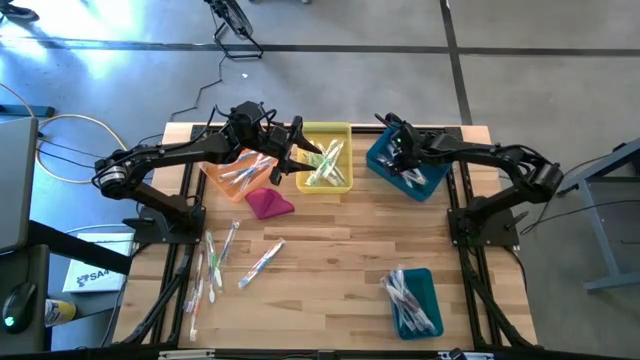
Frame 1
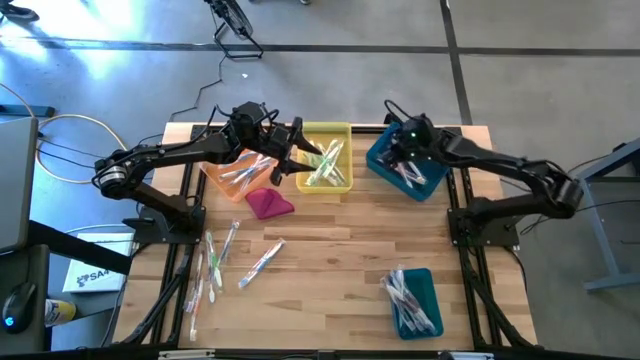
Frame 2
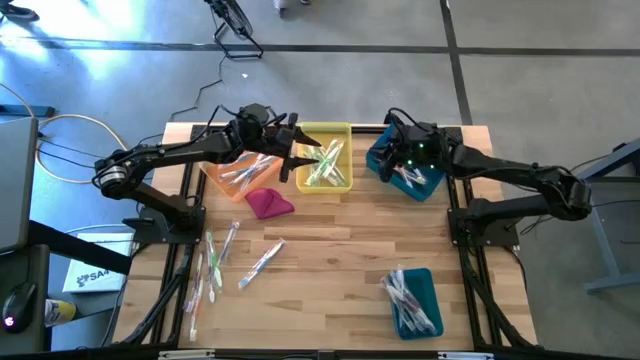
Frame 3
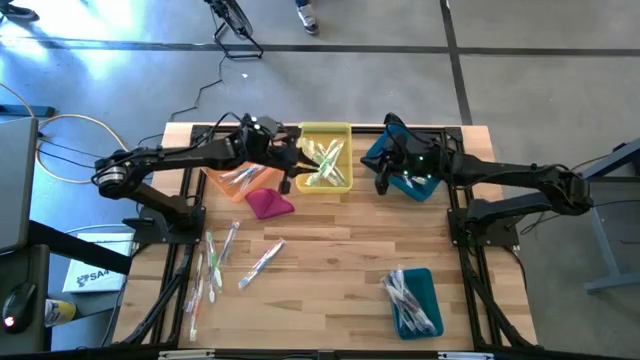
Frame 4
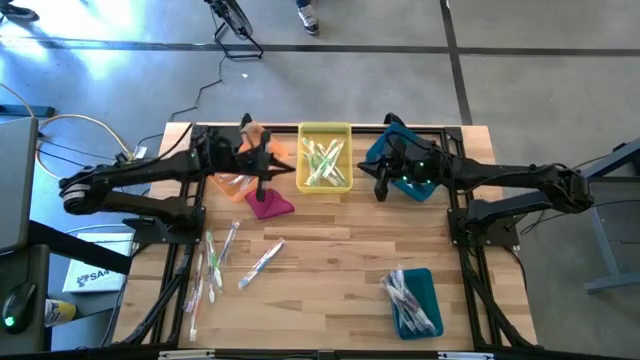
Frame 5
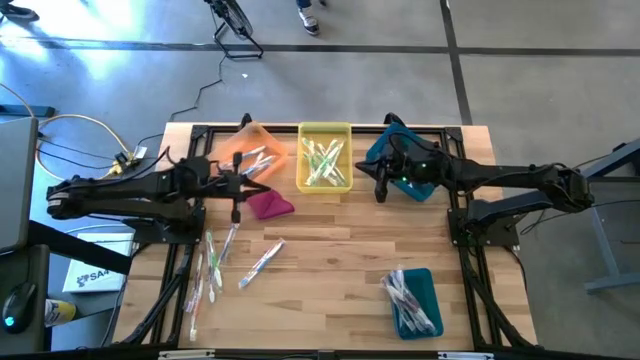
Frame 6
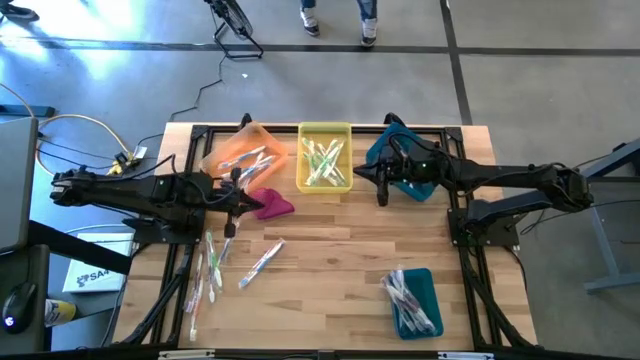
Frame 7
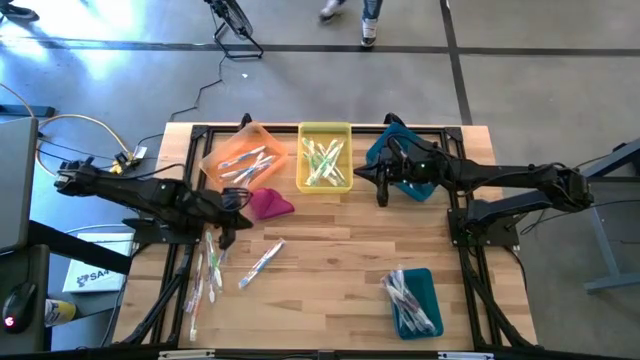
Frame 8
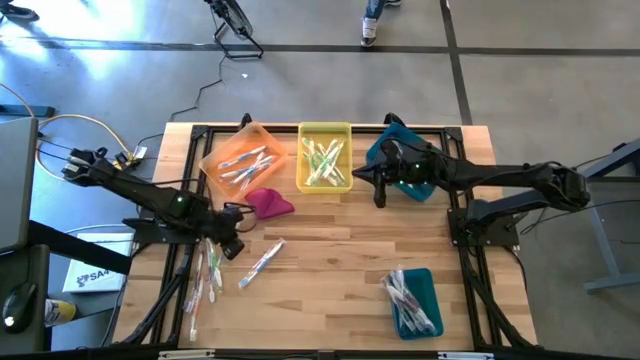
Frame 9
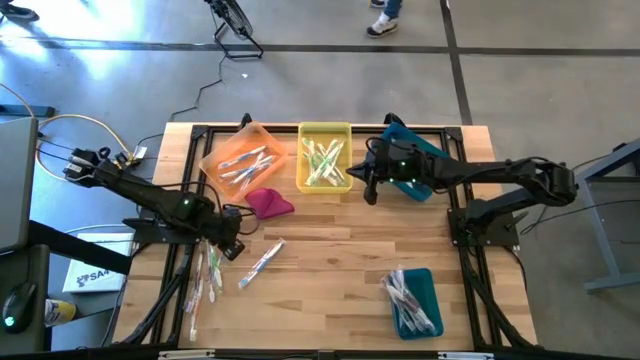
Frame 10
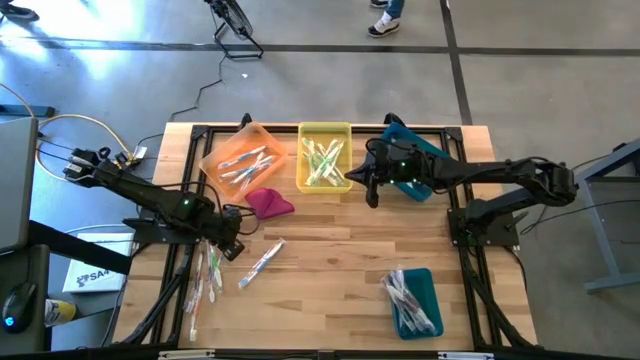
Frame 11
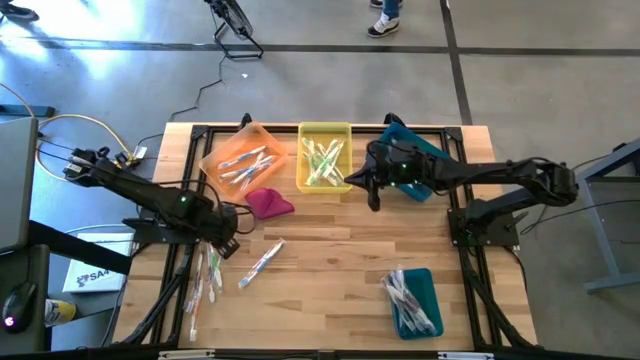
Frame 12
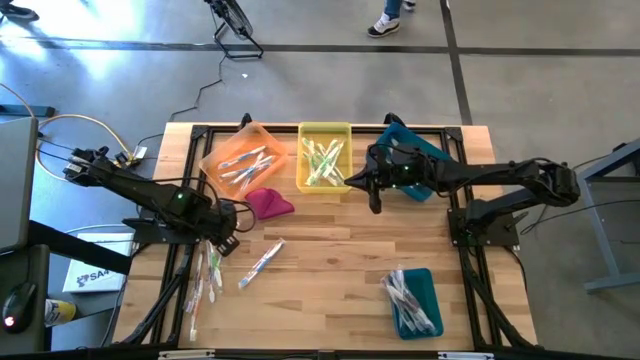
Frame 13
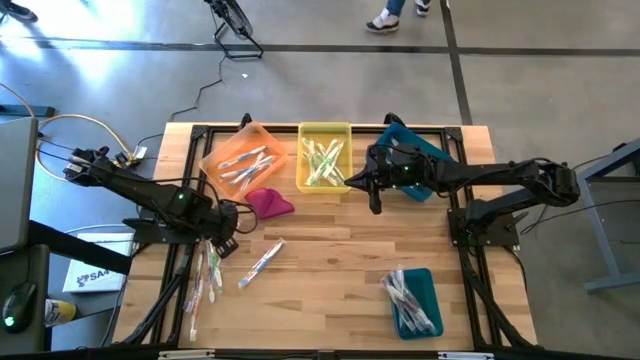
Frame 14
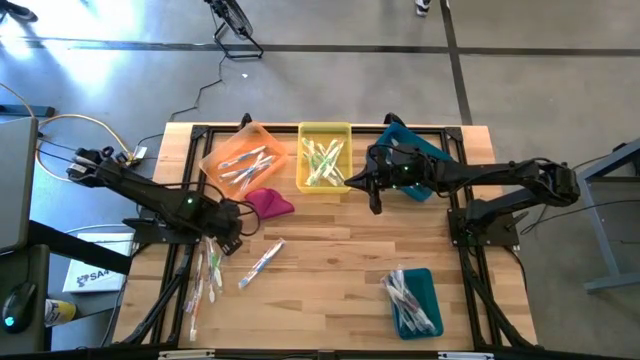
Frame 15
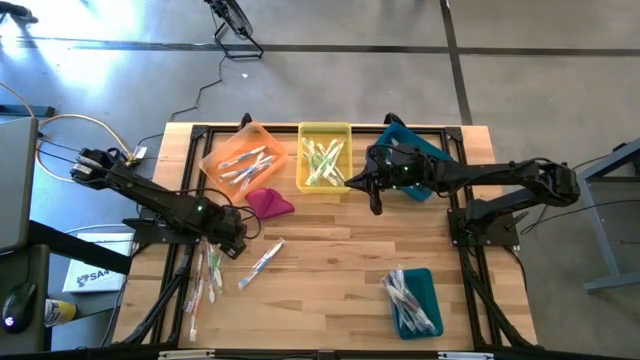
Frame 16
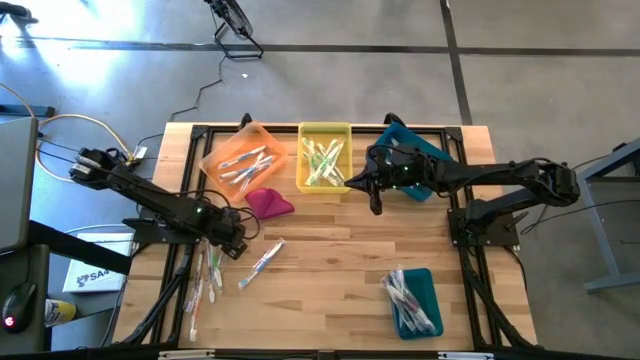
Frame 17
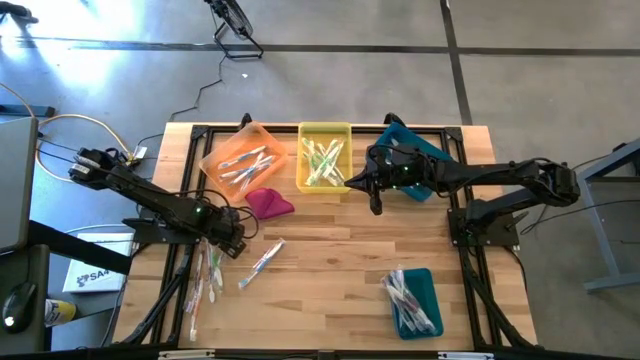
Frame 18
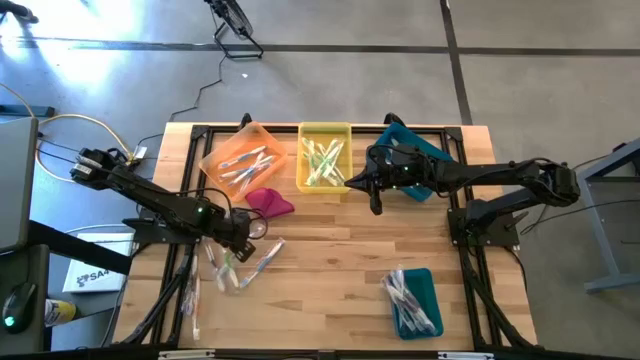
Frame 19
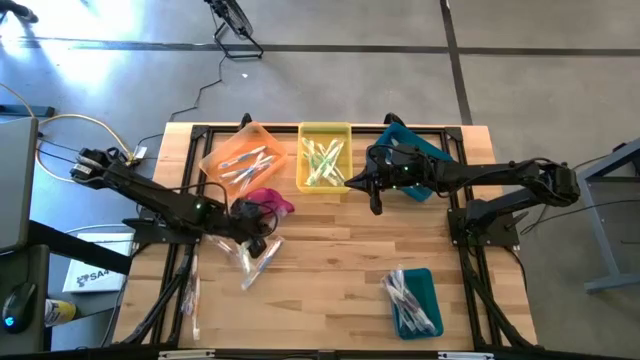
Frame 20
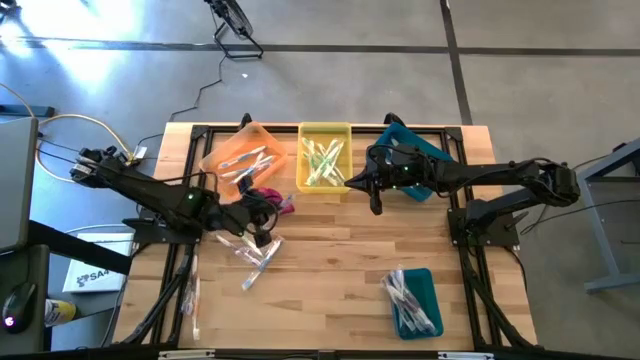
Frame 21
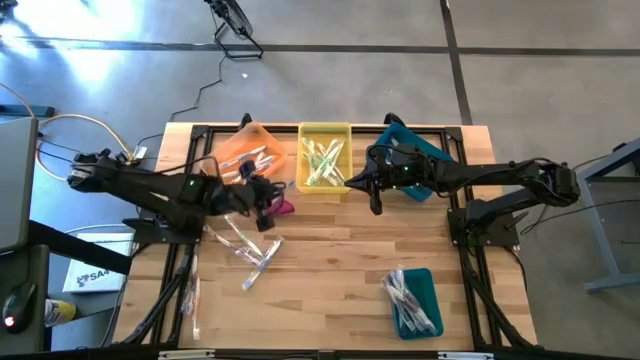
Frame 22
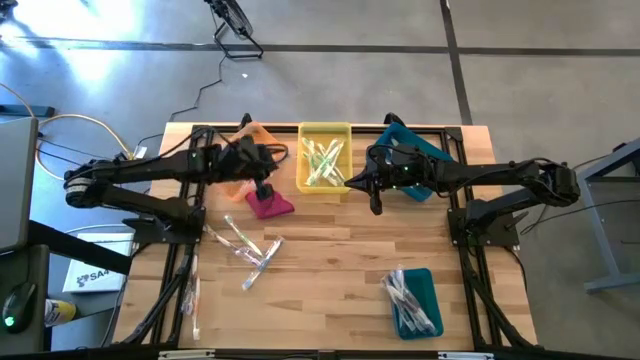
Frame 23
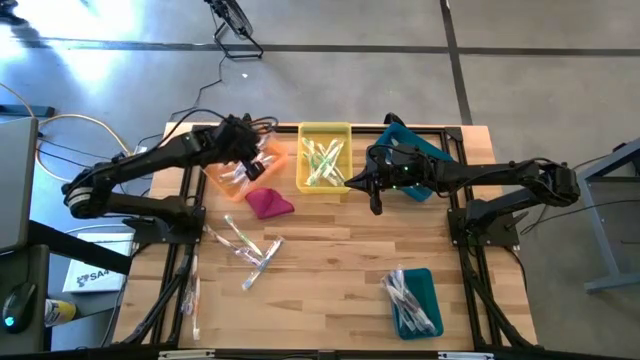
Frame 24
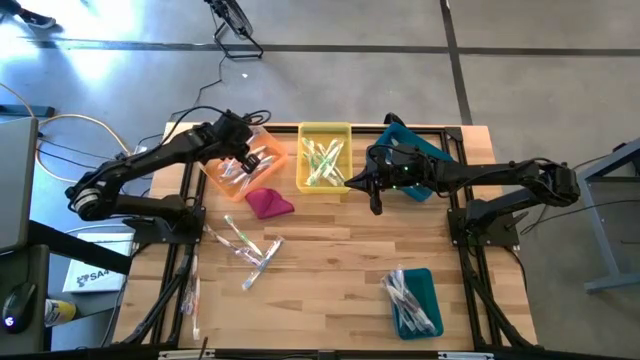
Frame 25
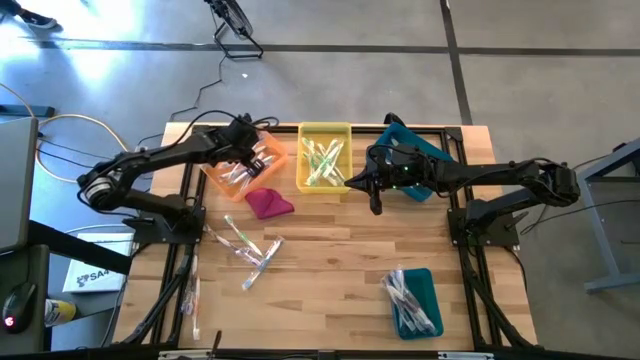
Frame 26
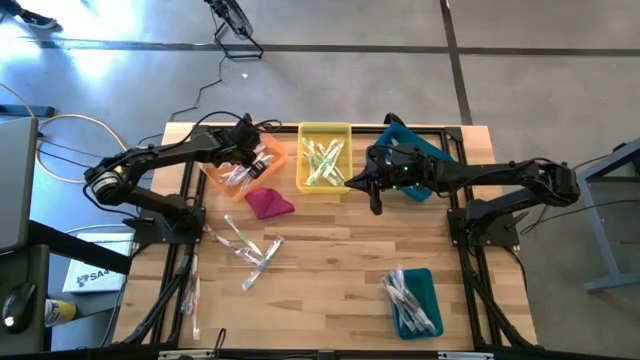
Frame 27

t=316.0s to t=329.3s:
Task: Pick & Place Toothbrushes
Put the blue toothbrush into the orange bin

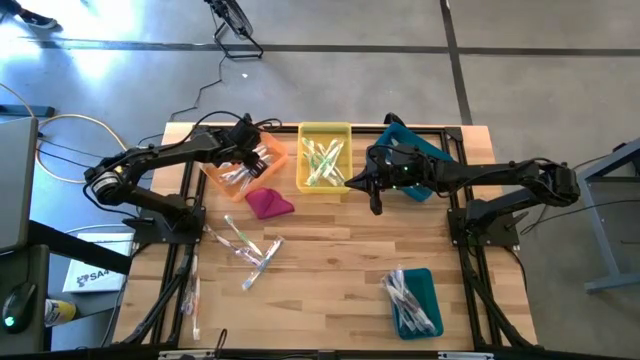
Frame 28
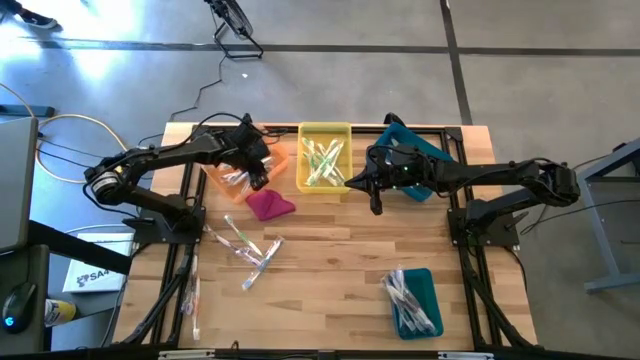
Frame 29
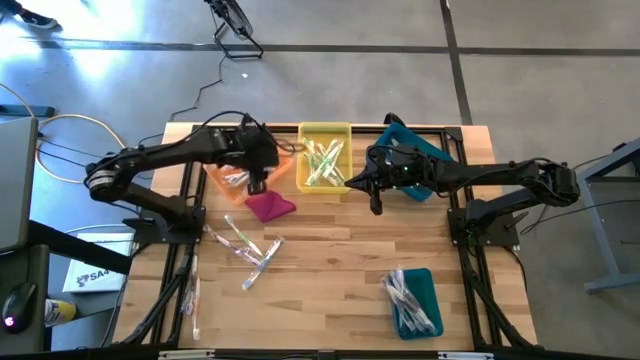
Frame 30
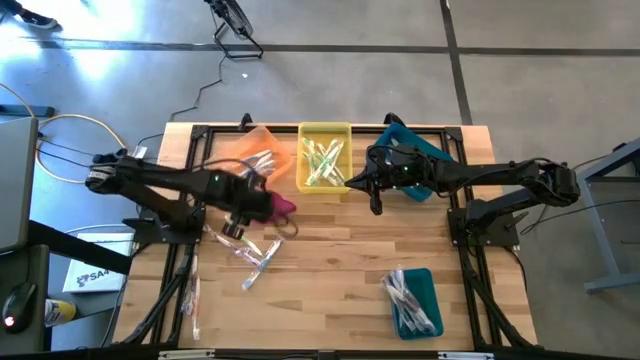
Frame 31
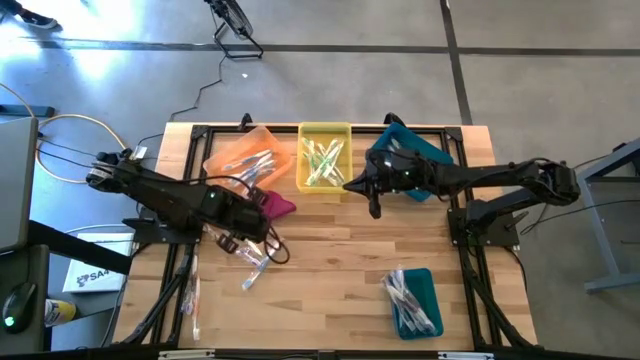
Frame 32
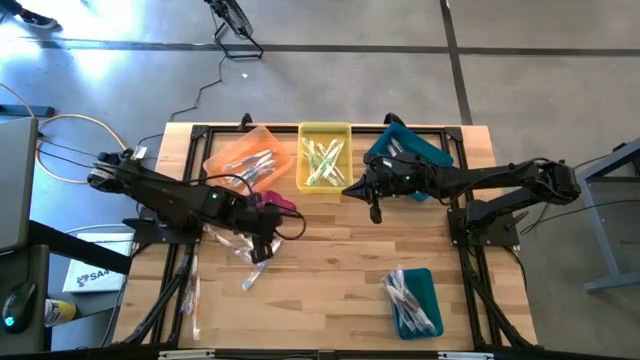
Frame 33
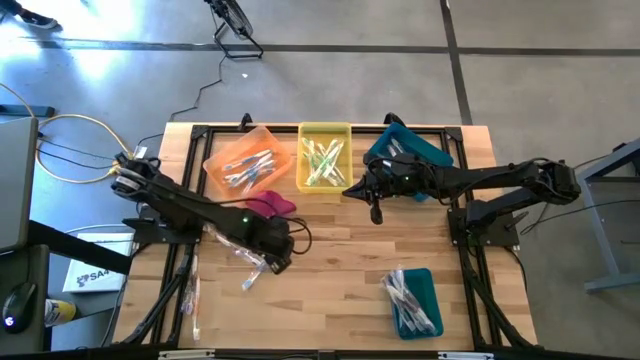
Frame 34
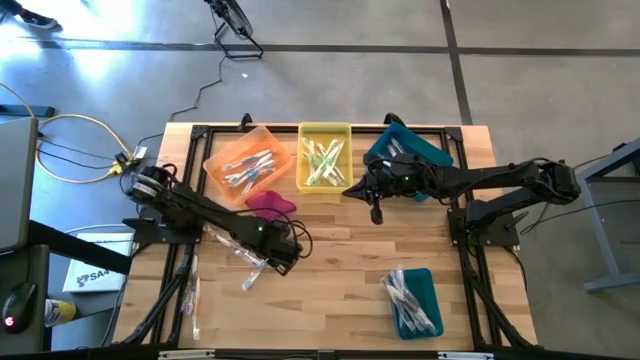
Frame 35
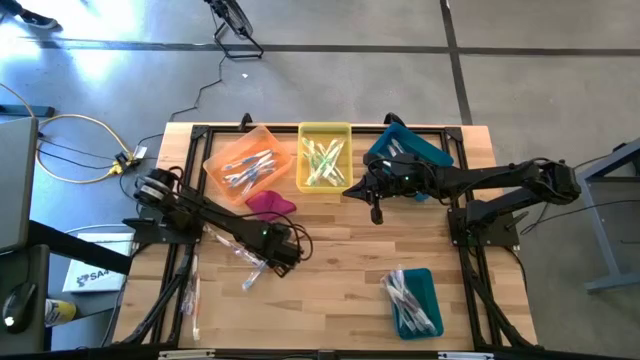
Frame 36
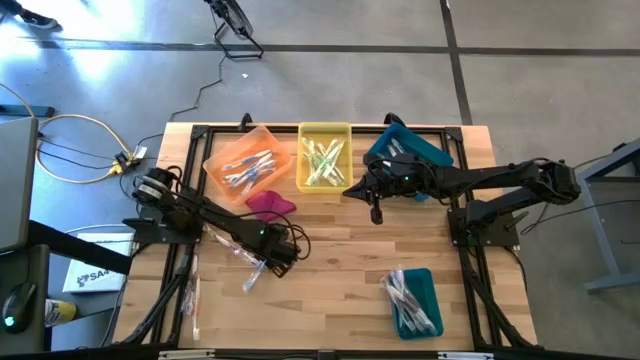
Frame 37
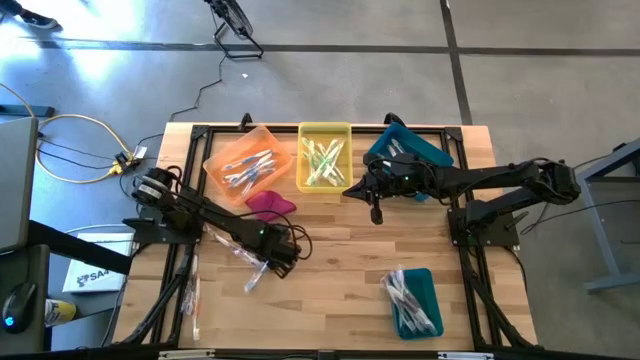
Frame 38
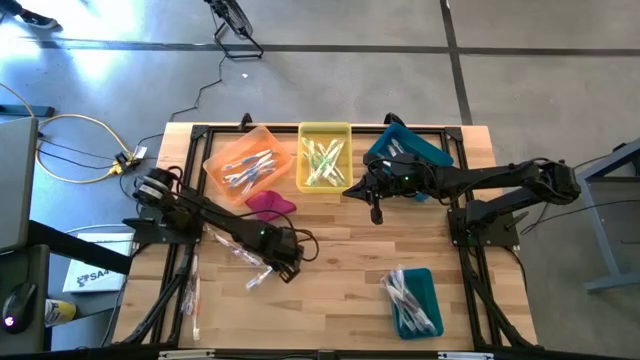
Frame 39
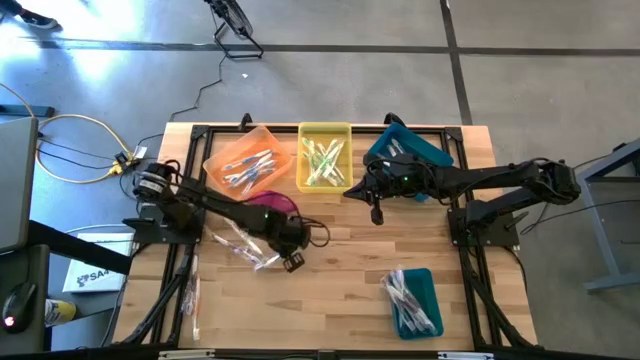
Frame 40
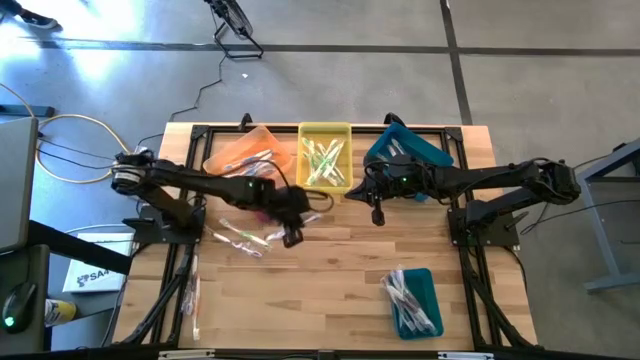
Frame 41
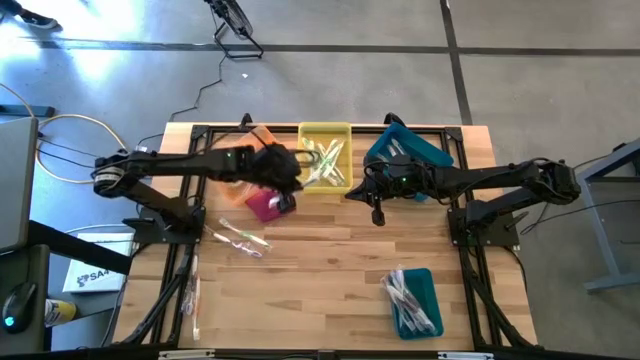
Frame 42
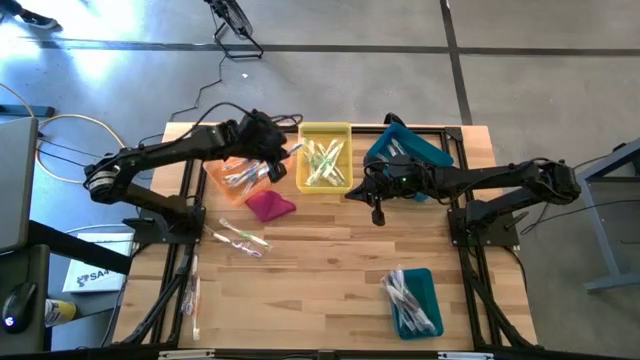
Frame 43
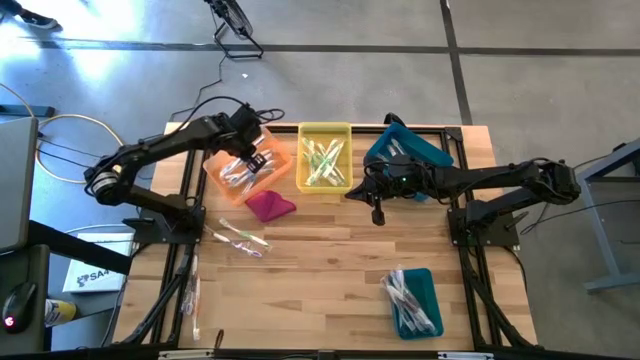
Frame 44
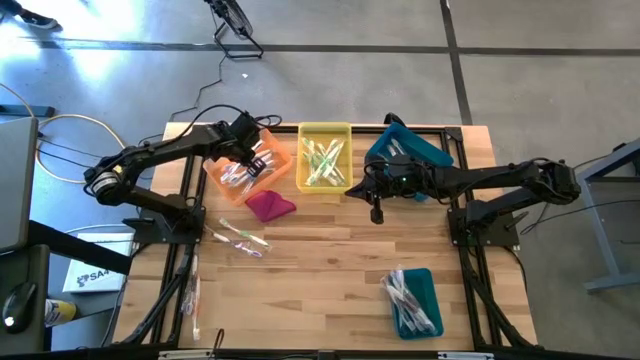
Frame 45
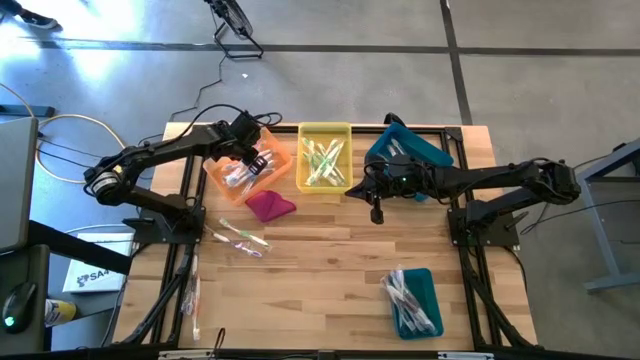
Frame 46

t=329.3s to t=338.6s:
Put the blue toothbrush into the orange bin
